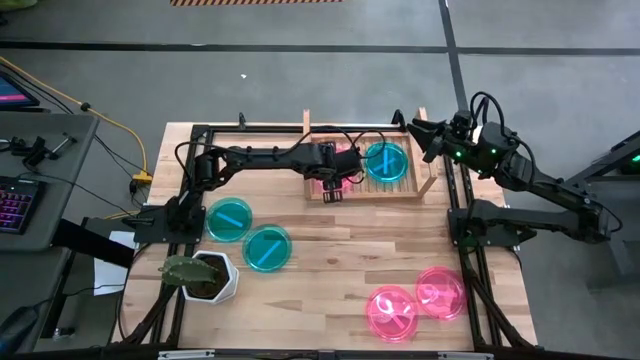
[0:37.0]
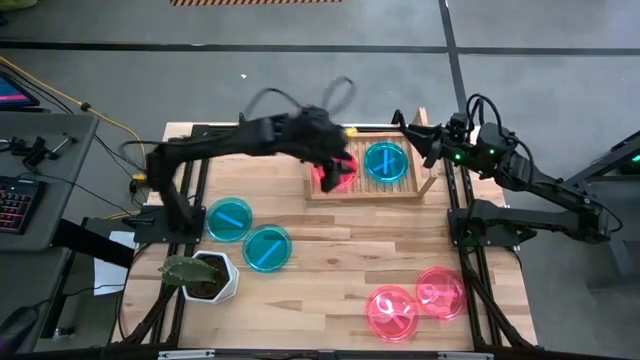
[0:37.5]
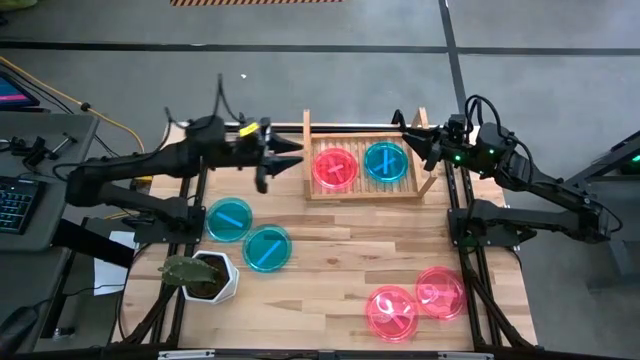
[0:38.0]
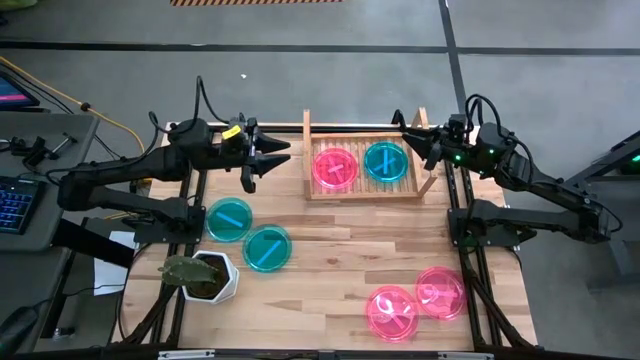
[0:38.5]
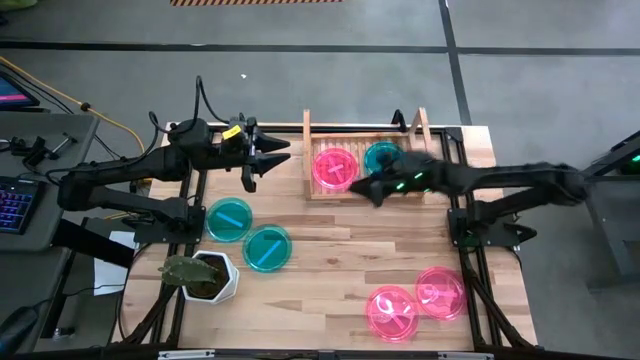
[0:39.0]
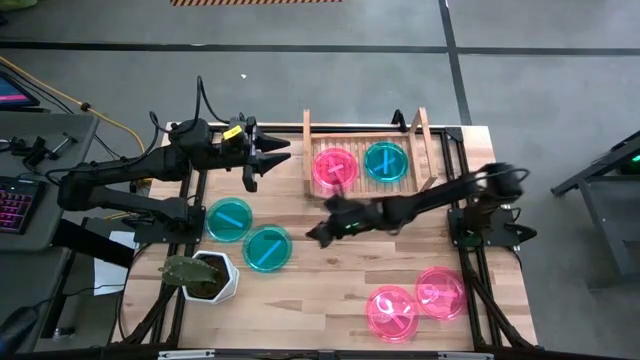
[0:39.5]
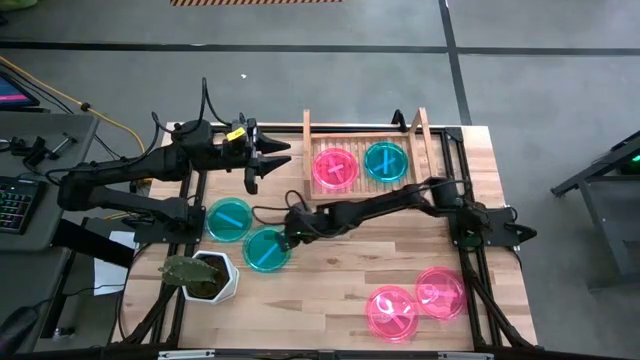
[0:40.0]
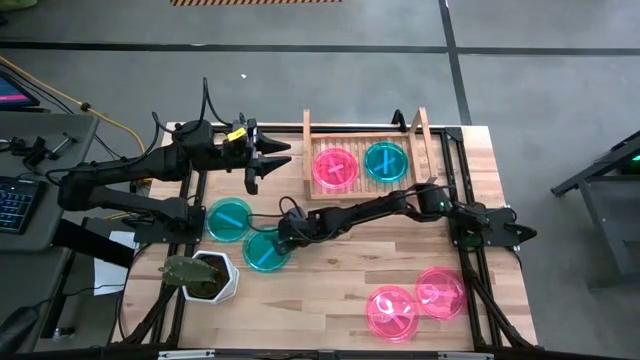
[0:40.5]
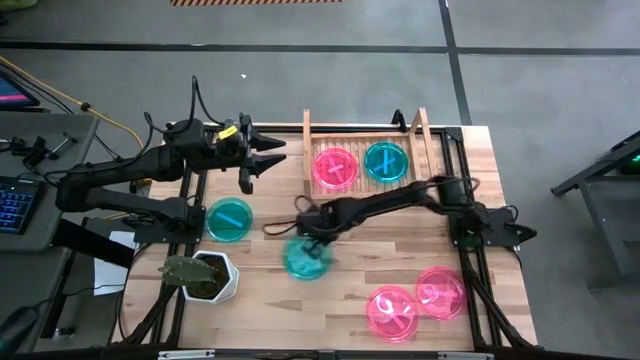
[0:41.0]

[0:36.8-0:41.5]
Task: Place and stack plates onto a shelf
Stack the blue plate on top of the other blue plates on the shelf

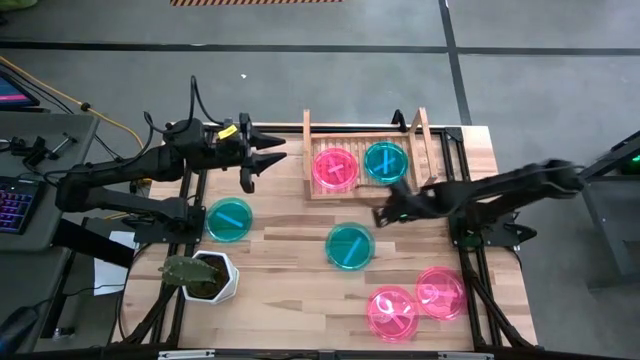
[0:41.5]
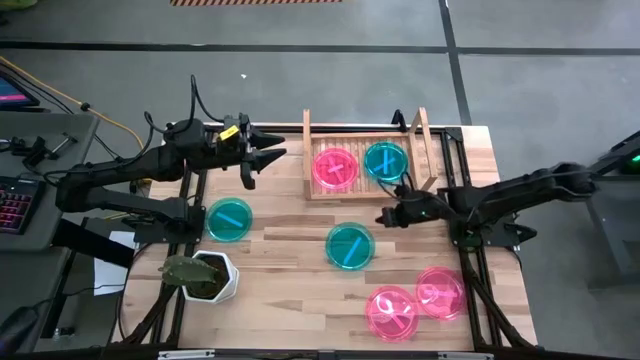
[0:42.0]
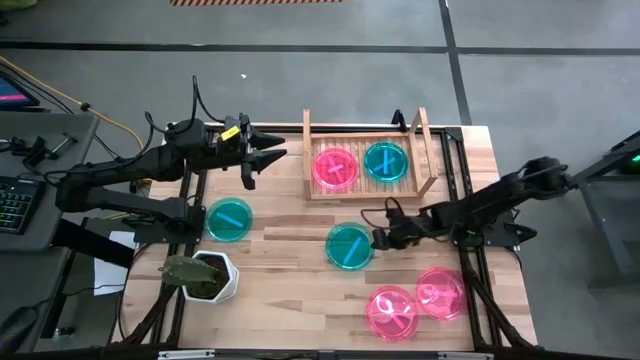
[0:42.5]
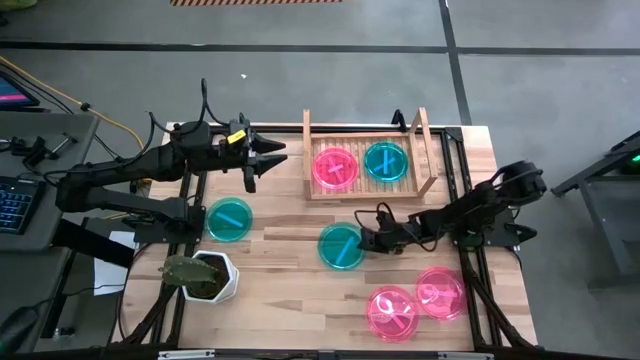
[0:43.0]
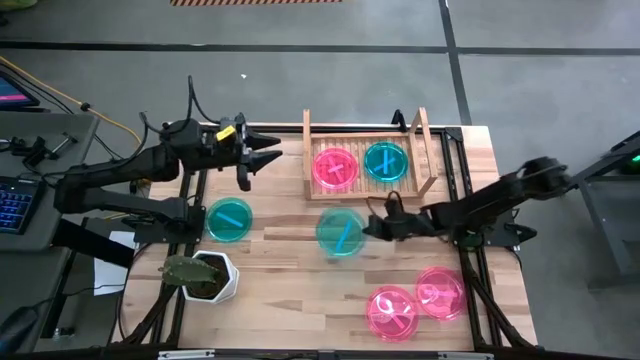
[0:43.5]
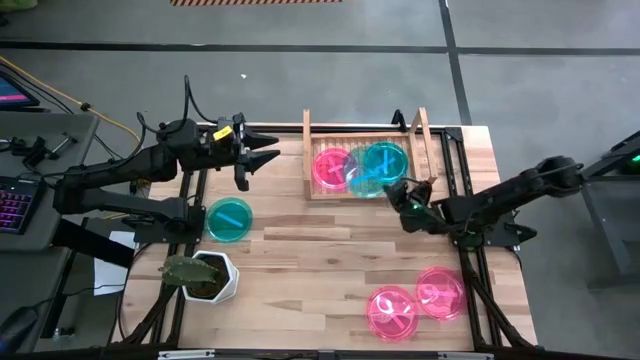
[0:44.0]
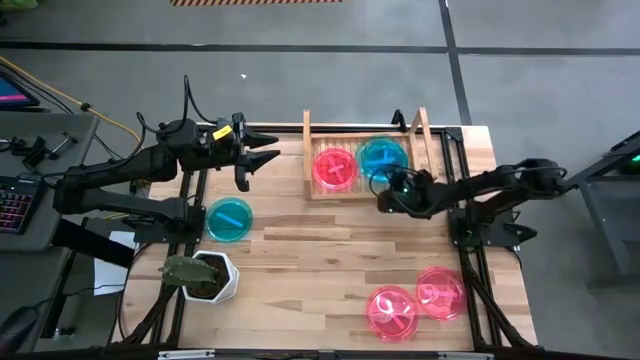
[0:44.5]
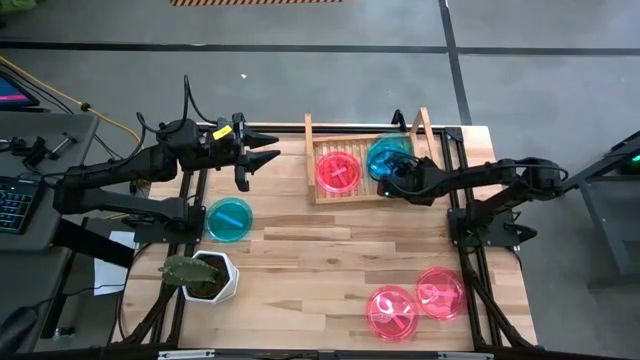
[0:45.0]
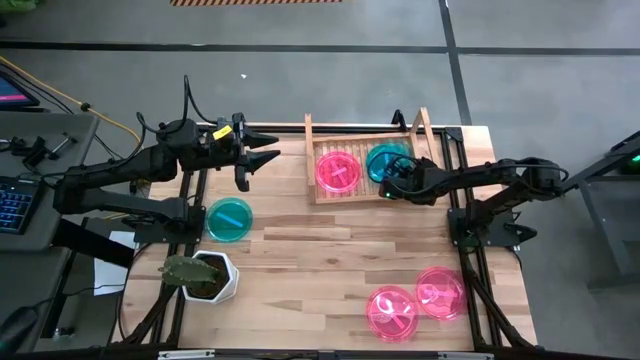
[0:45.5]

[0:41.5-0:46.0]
Stack the blue plate on top of the other blue plates on the shelf

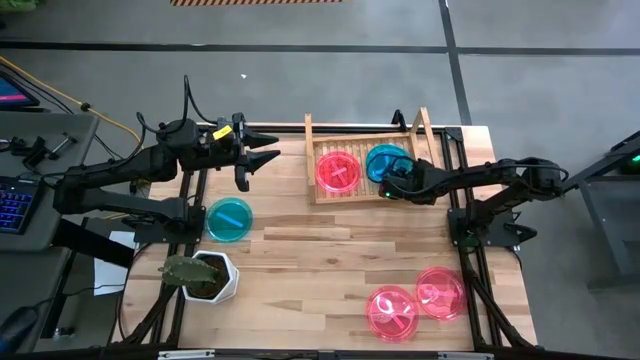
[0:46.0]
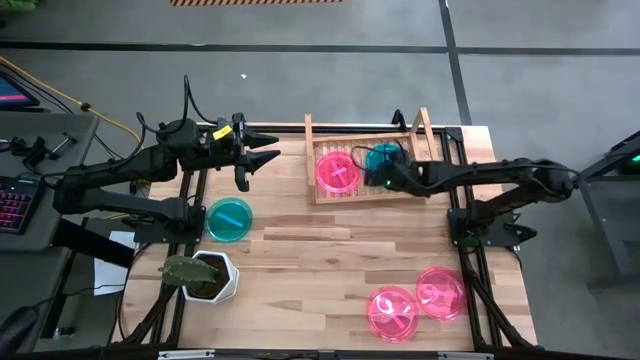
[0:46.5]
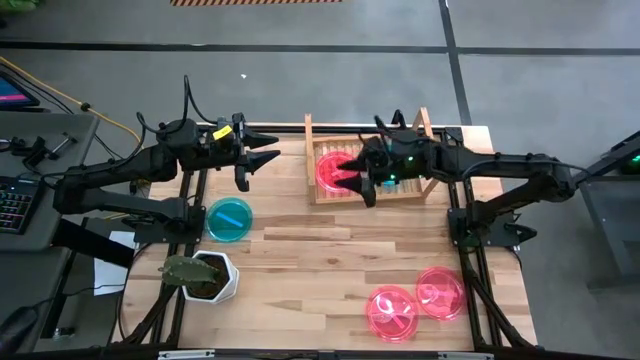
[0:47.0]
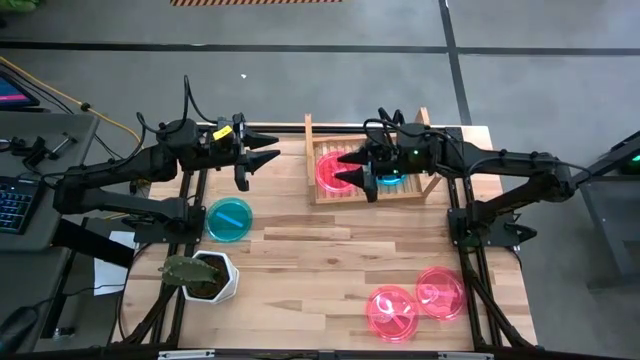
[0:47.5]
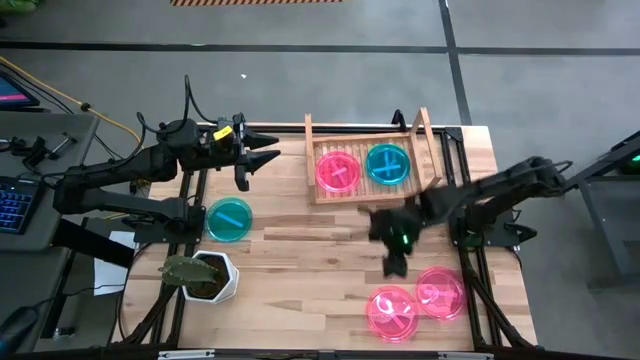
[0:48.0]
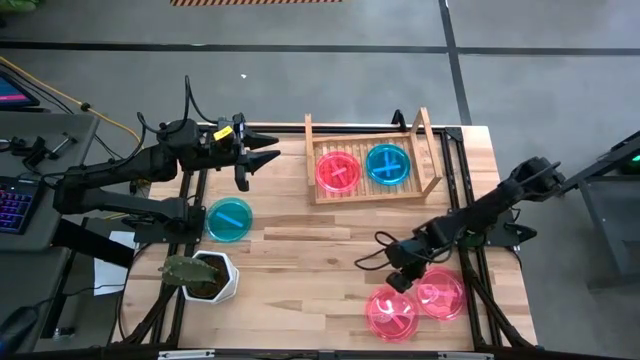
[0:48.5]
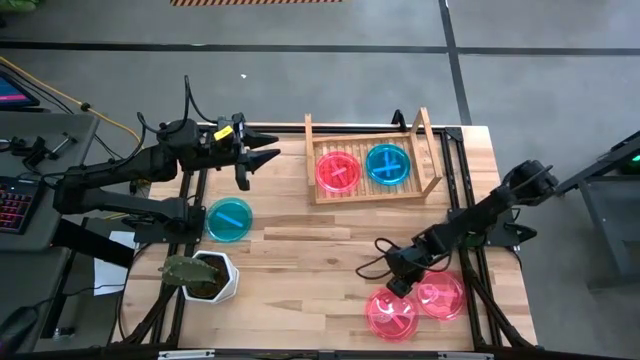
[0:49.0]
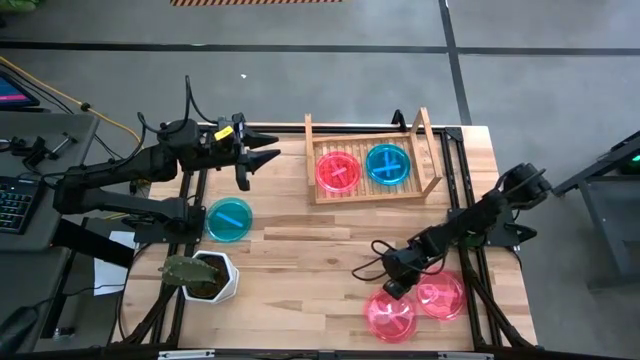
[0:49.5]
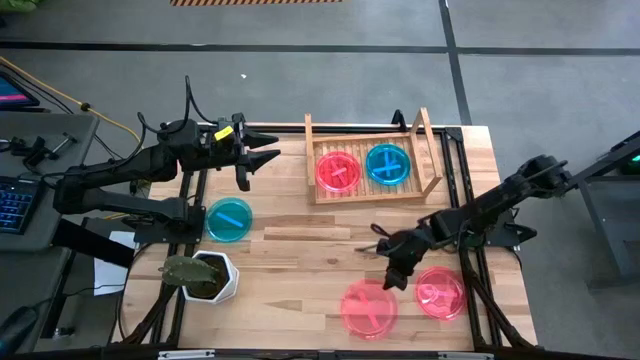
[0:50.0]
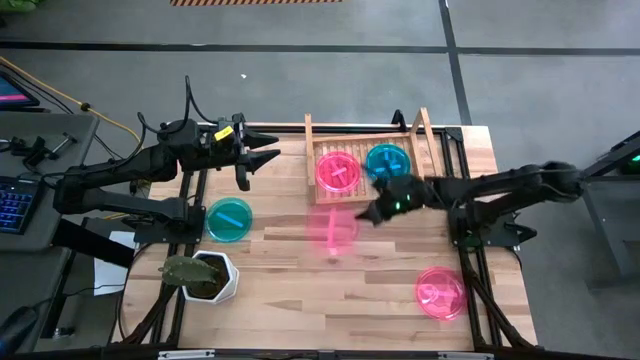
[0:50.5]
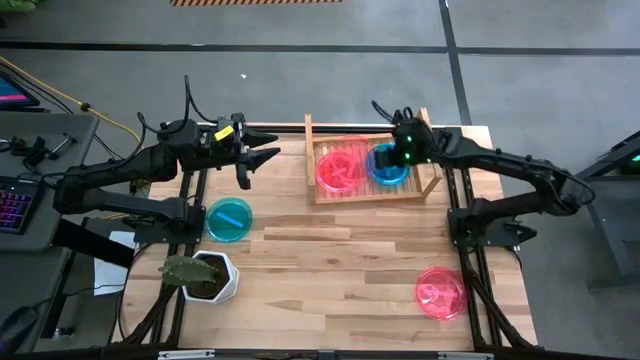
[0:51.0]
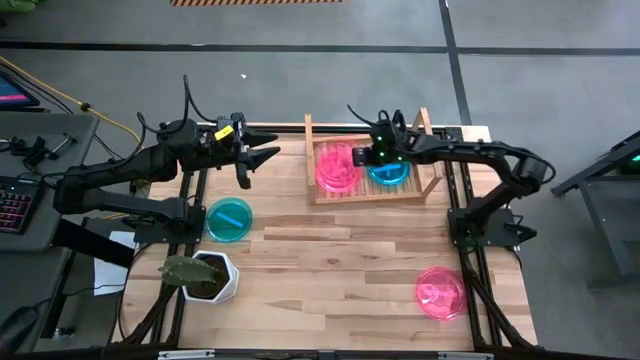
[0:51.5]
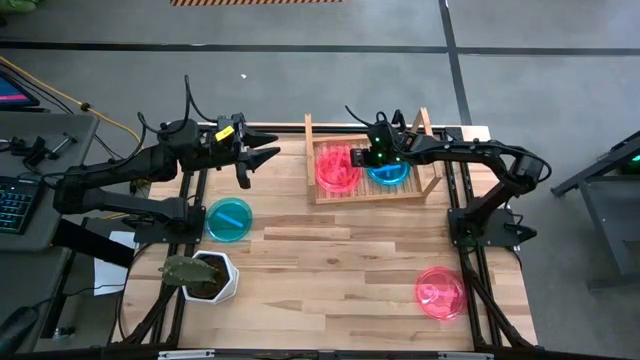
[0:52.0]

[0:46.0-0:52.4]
Stack the pink plate on top of the other pink plates on the shelf

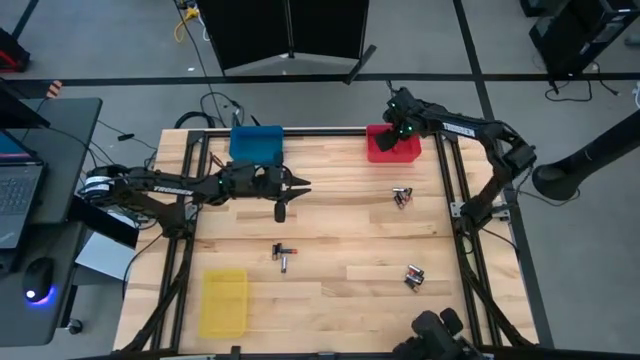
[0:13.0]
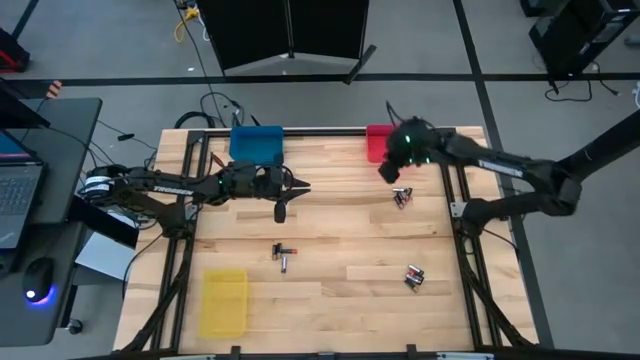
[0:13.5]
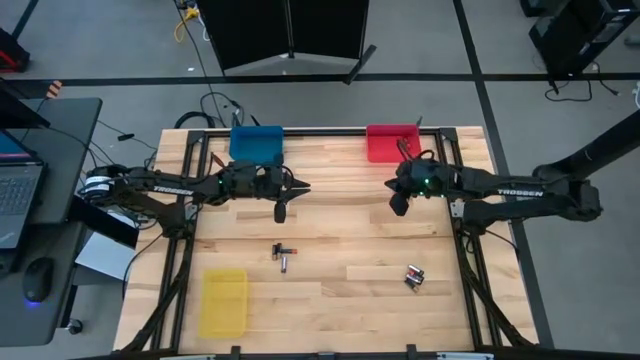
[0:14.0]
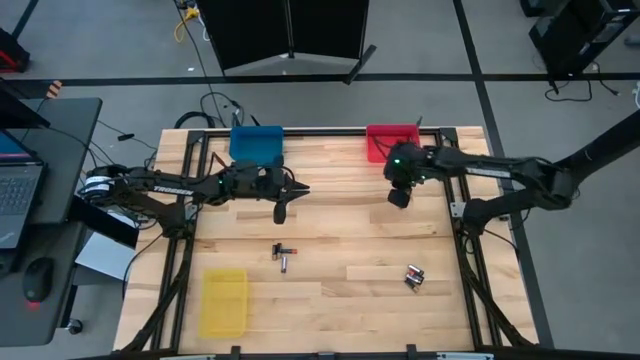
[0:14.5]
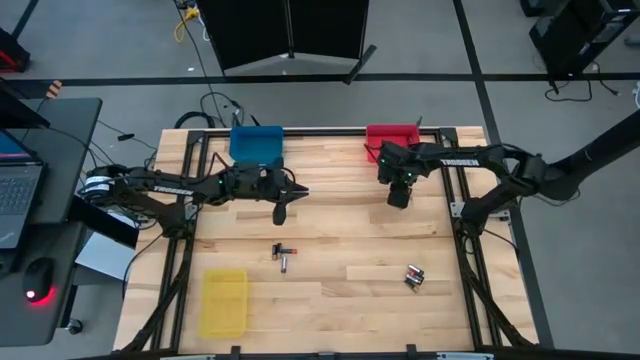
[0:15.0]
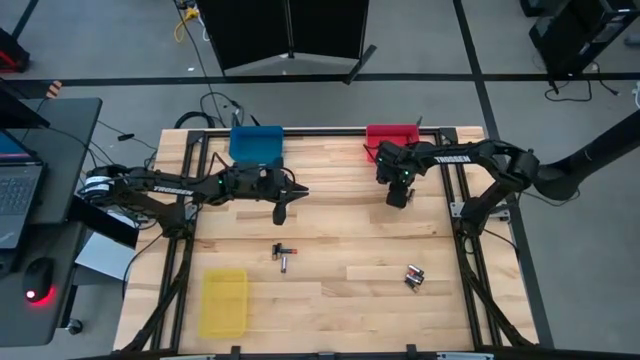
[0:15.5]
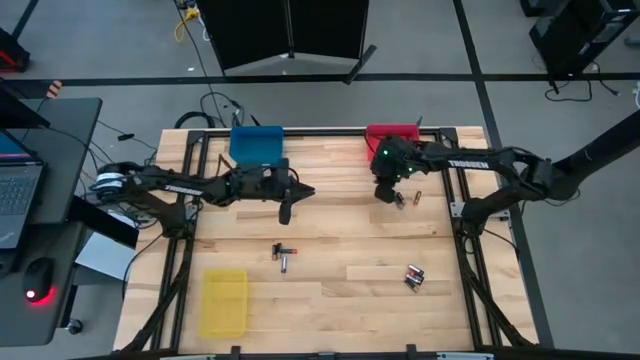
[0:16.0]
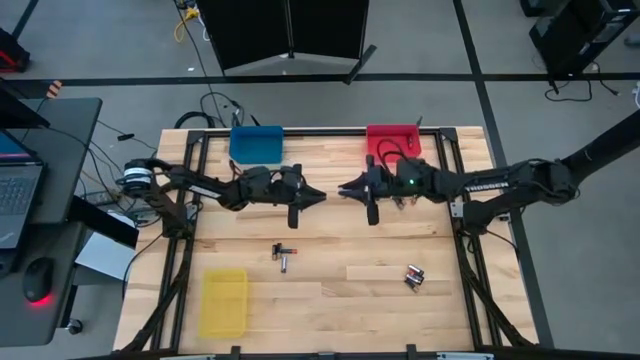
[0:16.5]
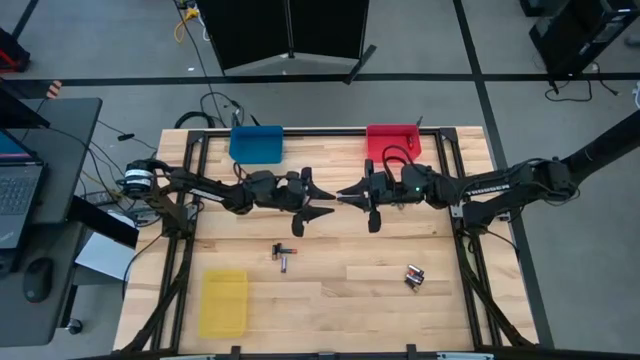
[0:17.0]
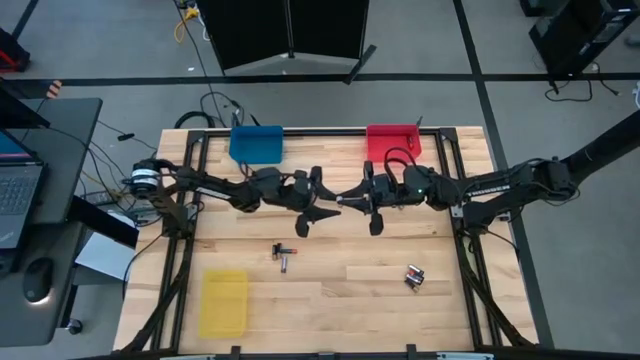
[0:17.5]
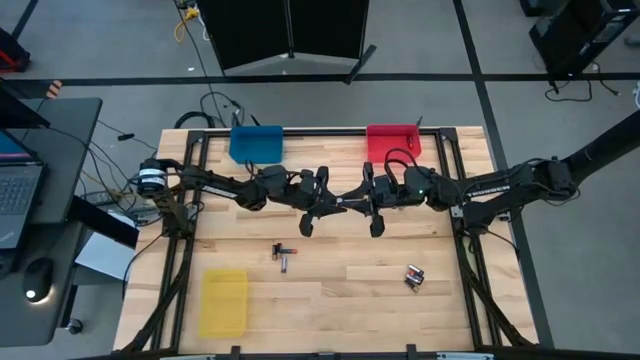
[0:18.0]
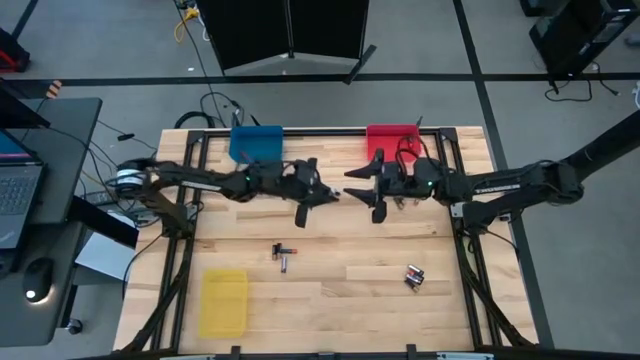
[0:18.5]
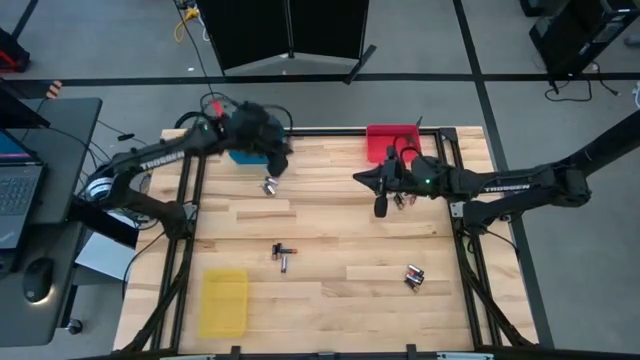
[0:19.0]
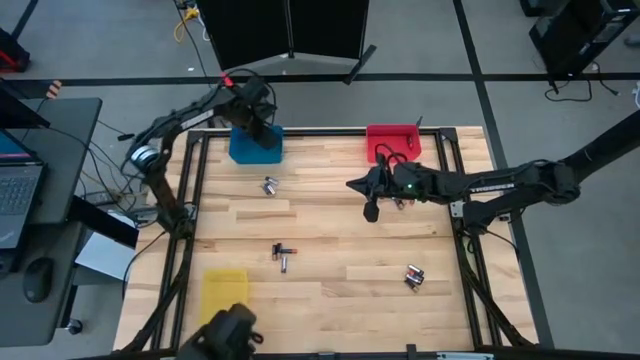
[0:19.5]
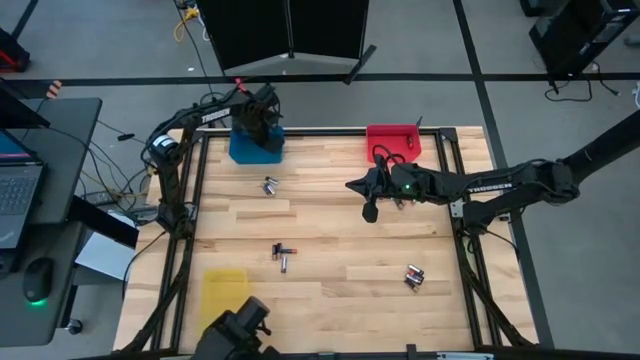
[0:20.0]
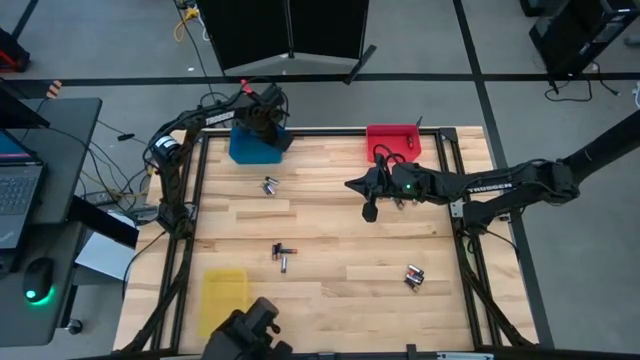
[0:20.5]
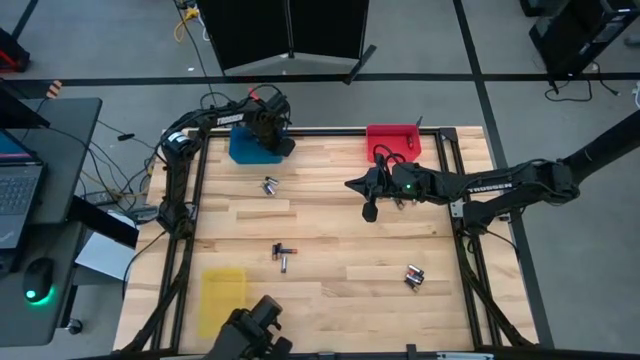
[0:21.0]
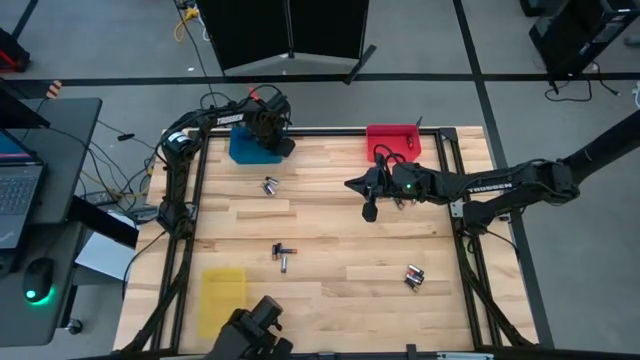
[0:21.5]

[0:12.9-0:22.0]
Task: Sort batteries
Put the silver battery into the blue bin
